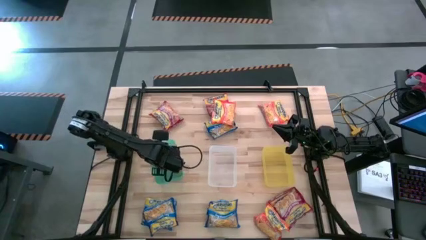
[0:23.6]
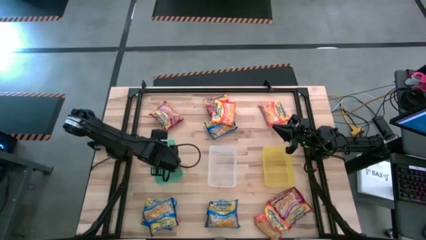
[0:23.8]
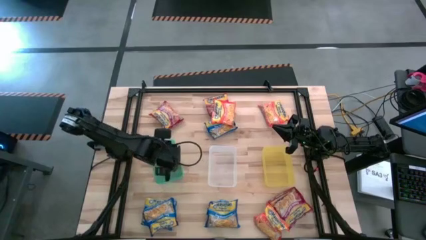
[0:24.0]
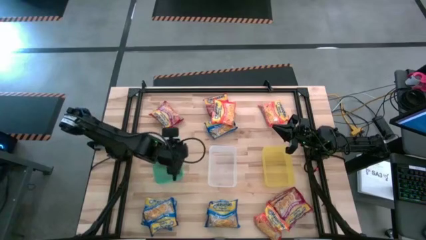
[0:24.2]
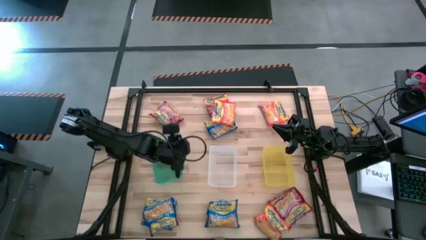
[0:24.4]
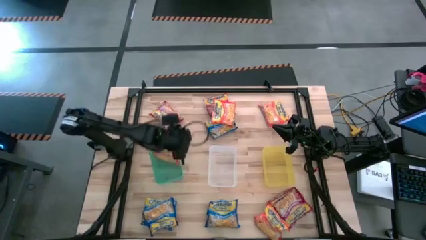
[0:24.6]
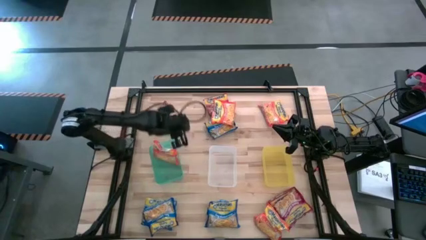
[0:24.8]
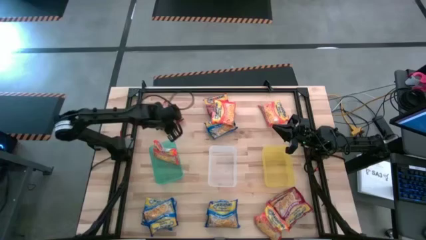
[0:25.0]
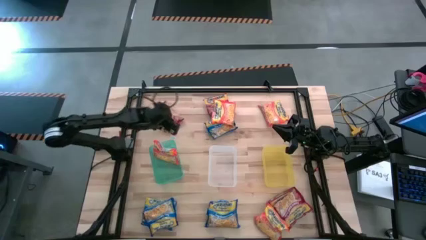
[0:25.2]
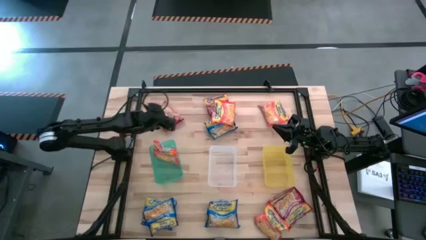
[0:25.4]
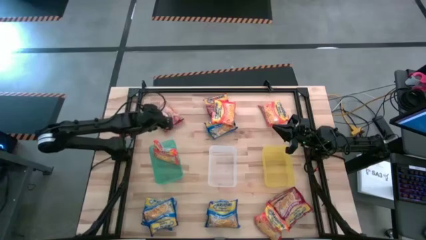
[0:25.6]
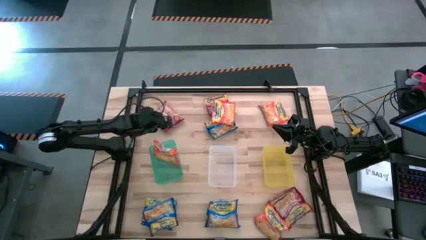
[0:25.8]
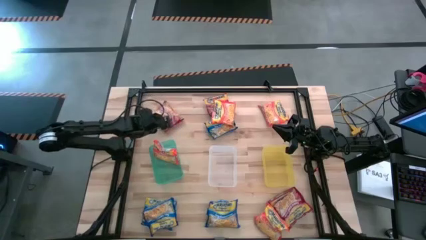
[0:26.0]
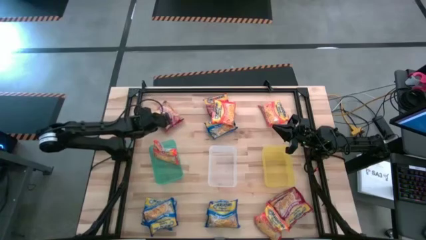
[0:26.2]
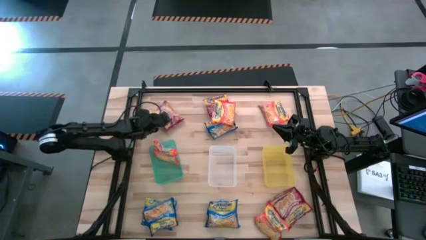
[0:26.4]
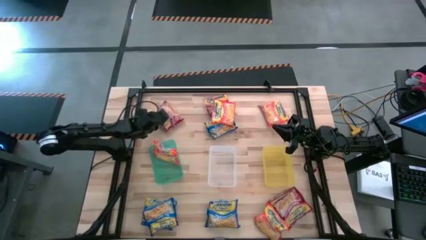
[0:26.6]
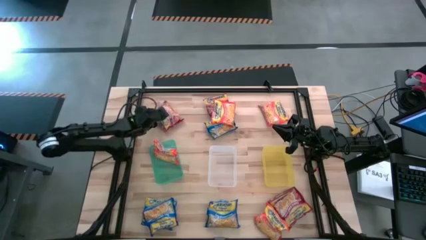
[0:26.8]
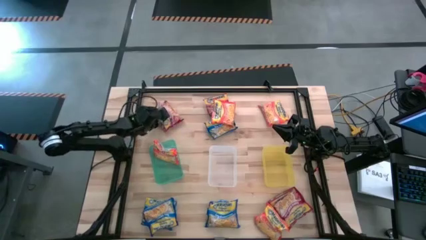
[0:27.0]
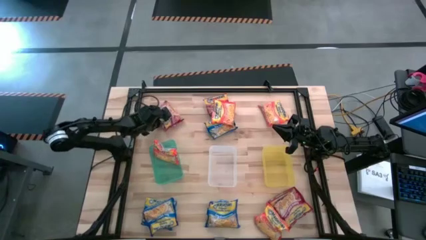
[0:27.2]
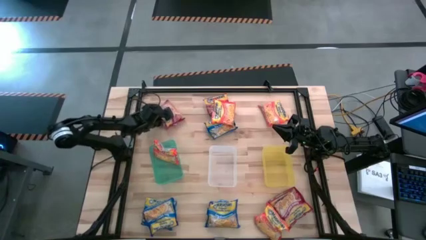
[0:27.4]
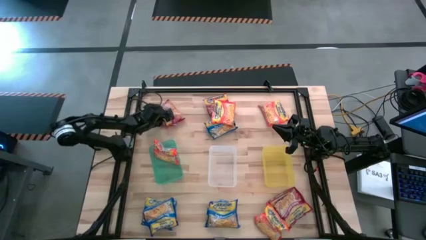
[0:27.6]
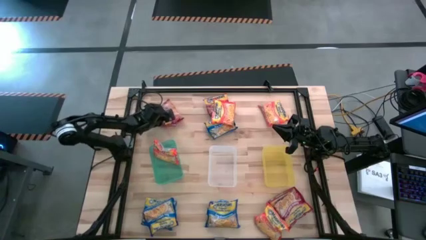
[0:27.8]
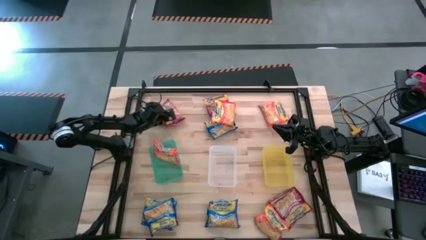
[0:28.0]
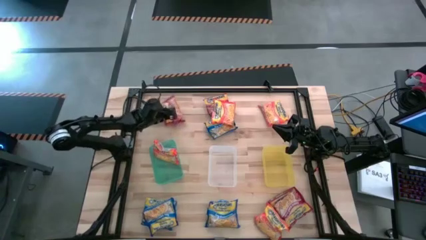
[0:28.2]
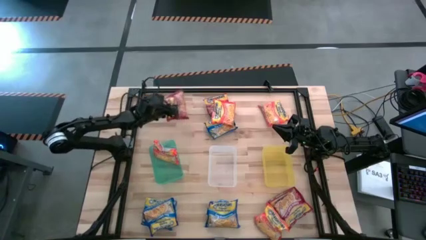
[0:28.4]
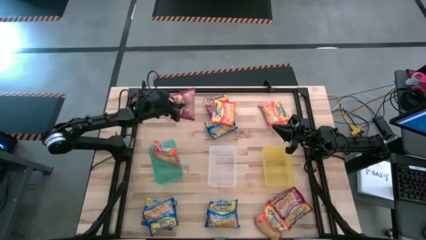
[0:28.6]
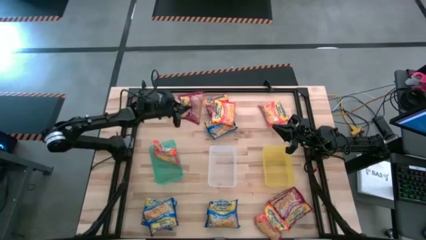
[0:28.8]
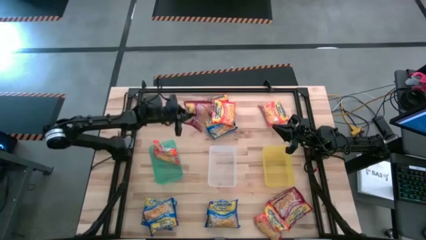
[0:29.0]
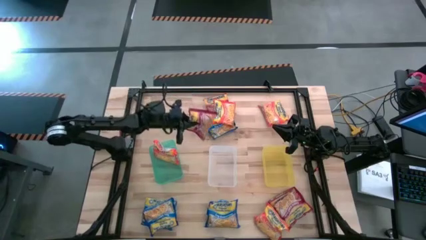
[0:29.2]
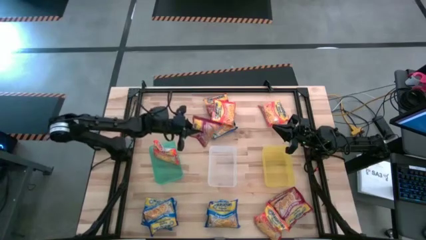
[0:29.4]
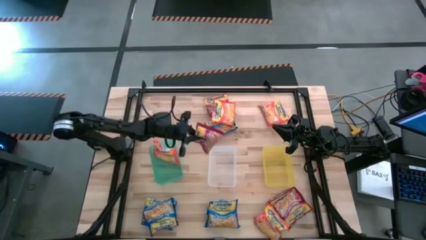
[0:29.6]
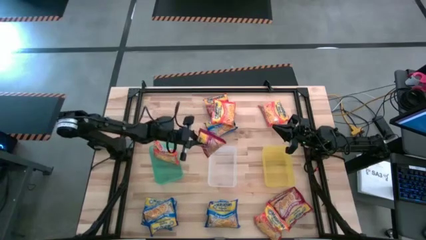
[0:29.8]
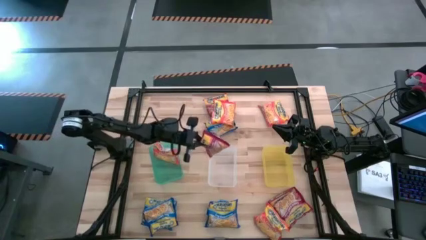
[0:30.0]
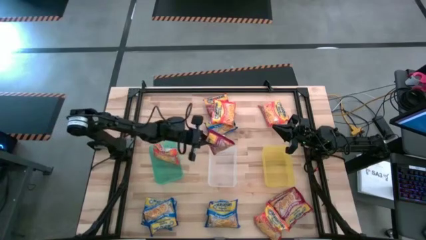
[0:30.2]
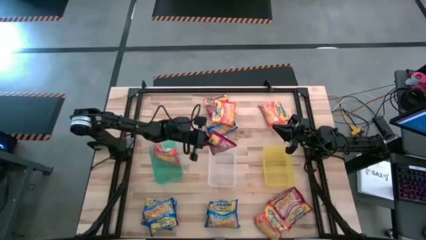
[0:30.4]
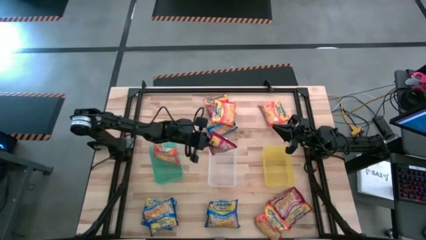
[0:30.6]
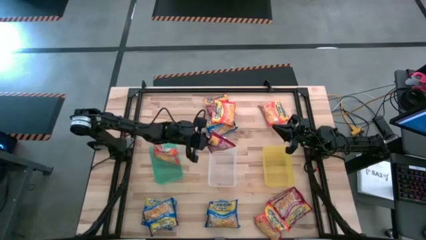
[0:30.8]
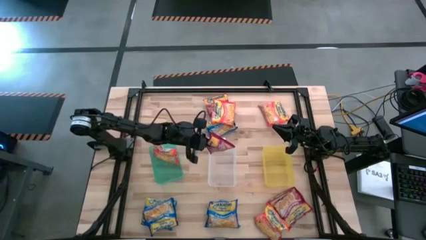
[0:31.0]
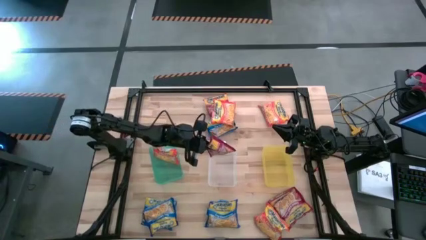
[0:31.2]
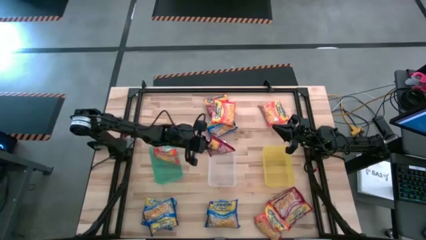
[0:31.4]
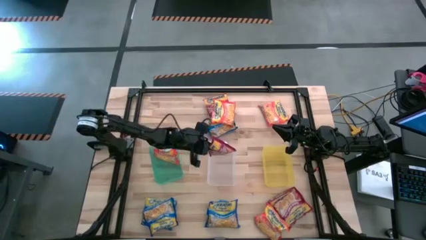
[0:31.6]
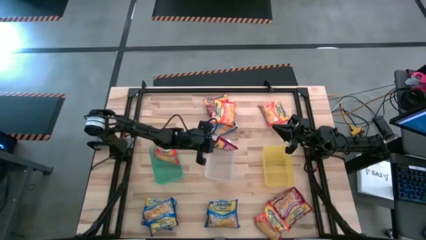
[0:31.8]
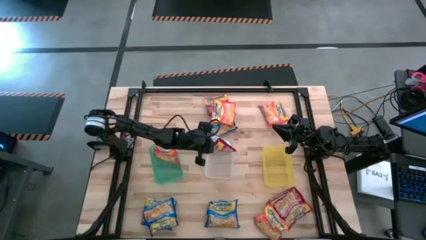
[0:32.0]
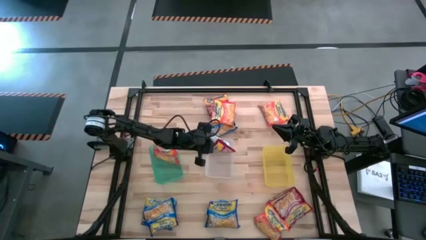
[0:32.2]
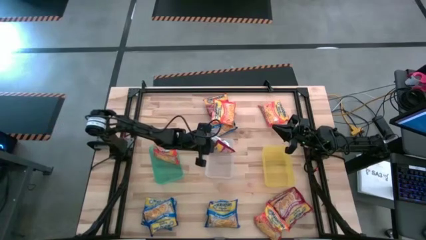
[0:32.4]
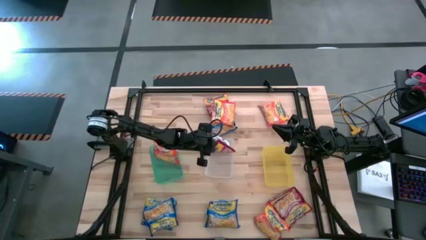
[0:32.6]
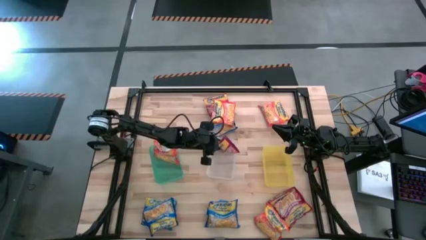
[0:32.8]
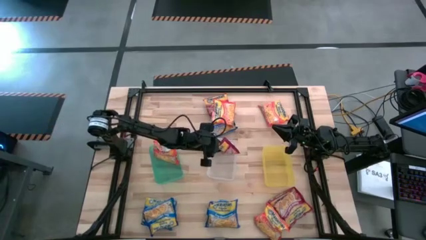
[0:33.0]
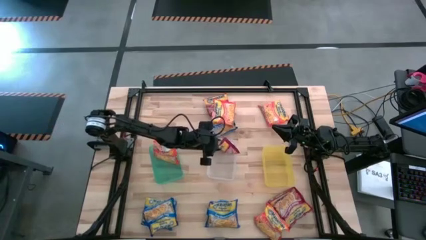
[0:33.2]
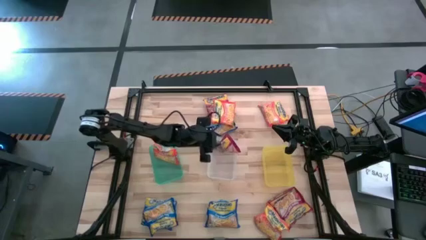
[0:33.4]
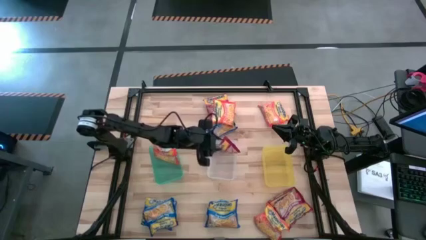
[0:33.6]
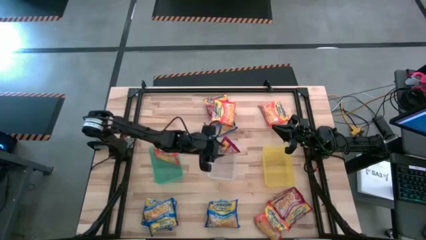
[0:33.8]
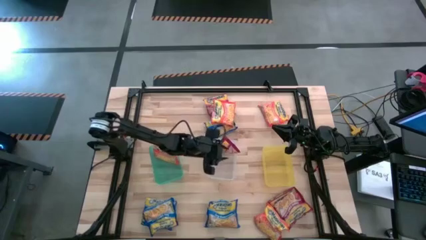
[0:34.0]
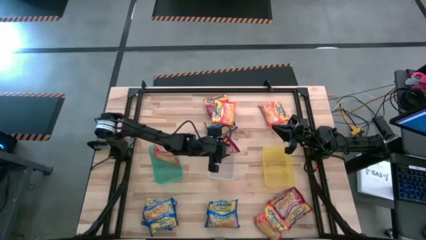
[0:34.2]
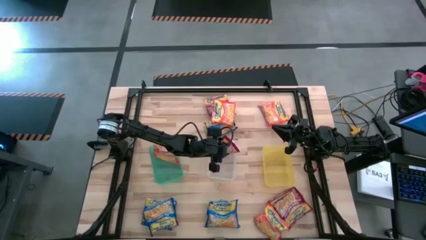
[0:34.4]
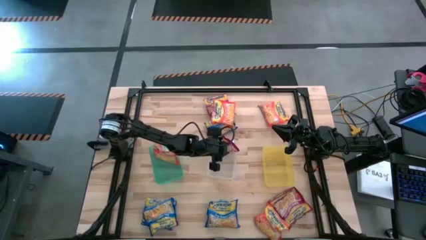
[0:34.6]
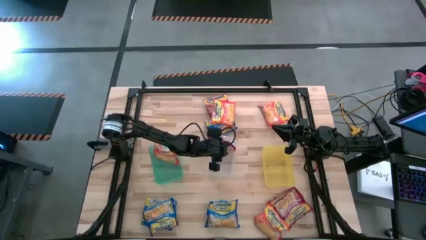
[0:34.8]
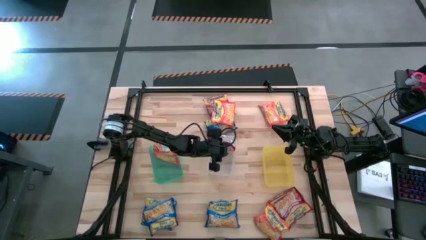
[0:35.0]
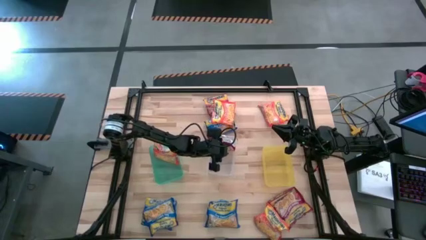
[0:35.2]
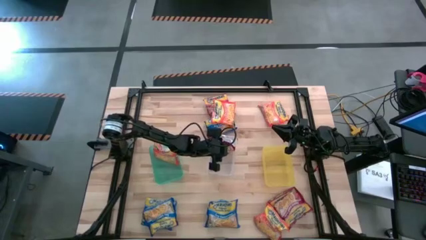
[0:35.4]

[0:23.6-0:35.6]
Task: Sort Maruchan noodles
Put the red noodle pack into the white bin

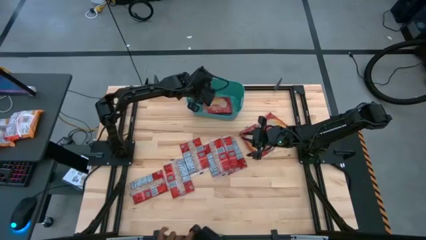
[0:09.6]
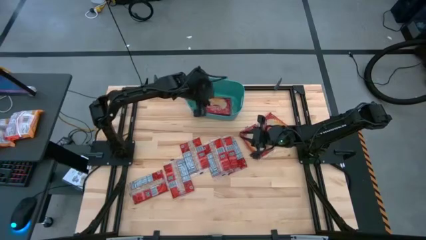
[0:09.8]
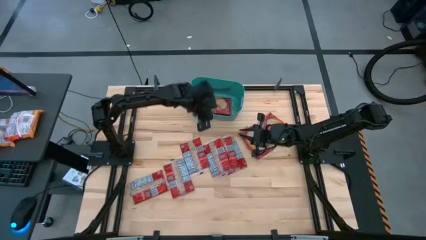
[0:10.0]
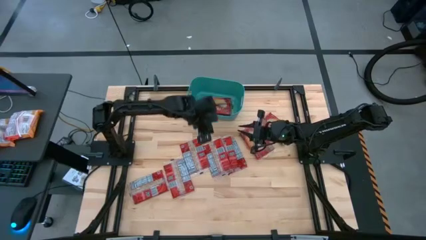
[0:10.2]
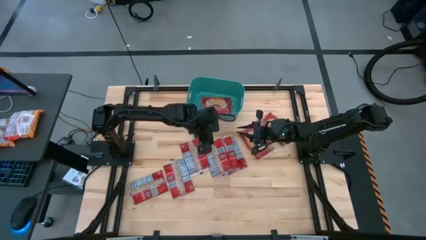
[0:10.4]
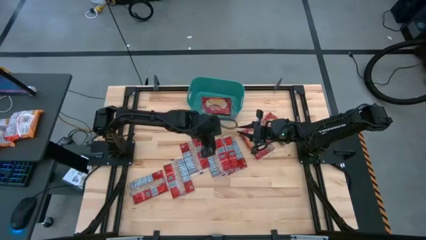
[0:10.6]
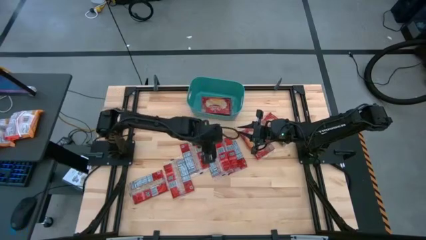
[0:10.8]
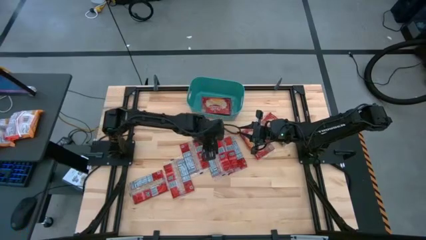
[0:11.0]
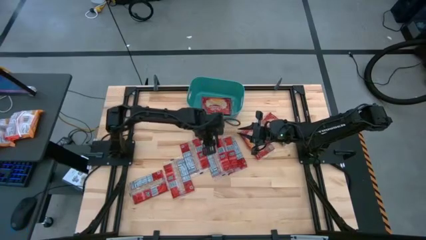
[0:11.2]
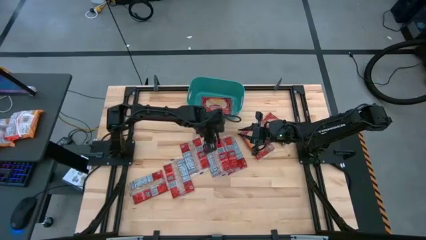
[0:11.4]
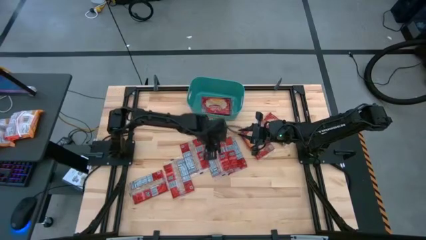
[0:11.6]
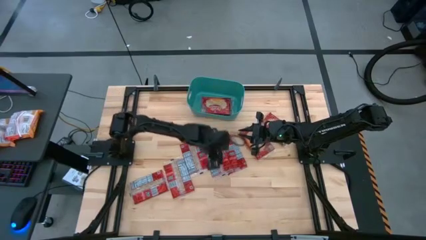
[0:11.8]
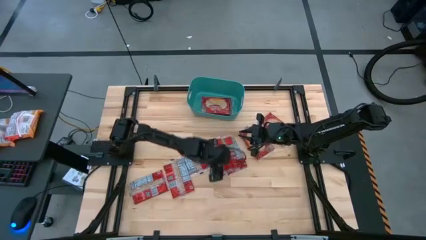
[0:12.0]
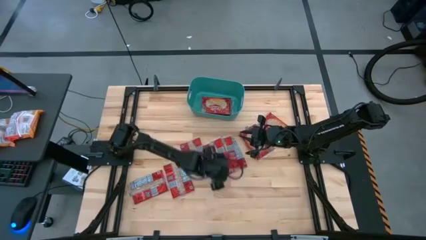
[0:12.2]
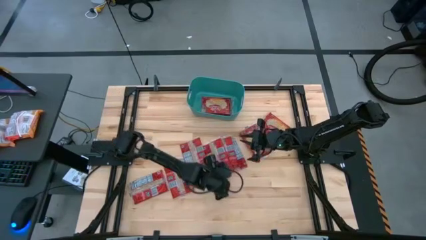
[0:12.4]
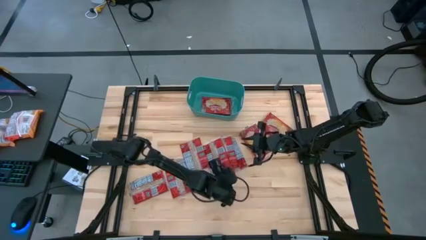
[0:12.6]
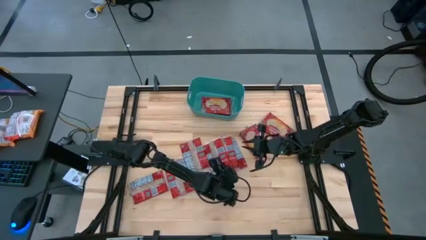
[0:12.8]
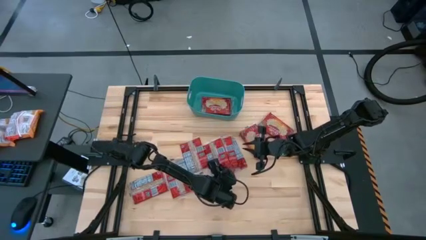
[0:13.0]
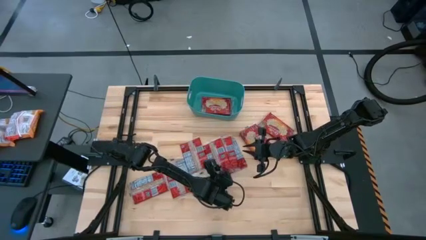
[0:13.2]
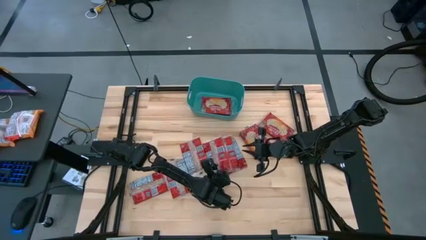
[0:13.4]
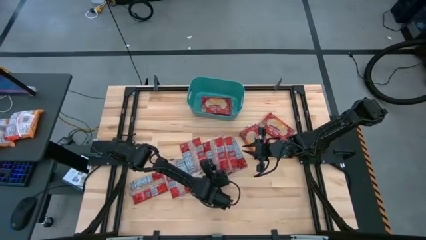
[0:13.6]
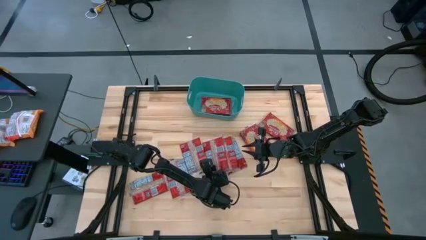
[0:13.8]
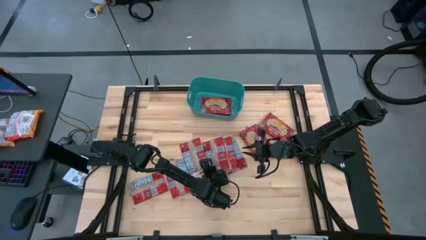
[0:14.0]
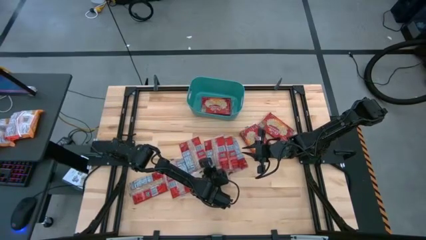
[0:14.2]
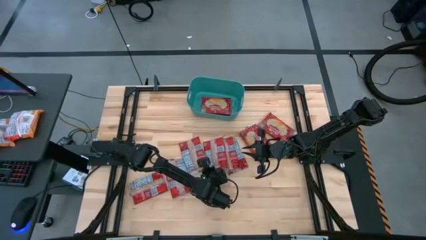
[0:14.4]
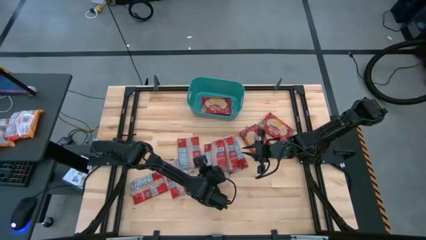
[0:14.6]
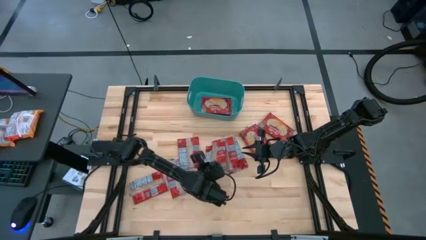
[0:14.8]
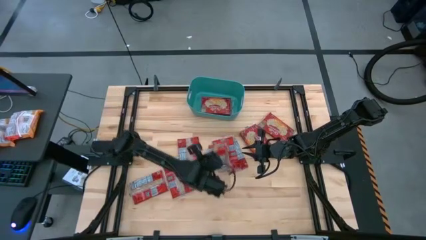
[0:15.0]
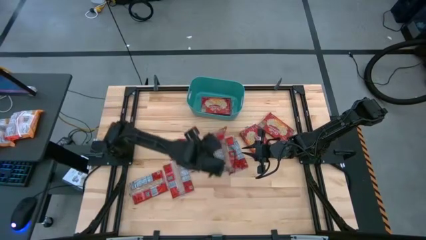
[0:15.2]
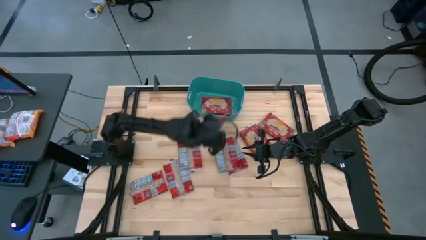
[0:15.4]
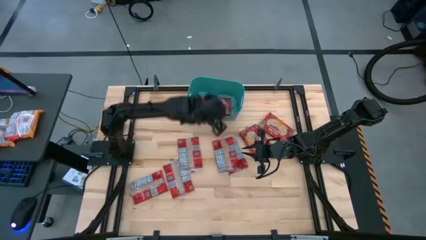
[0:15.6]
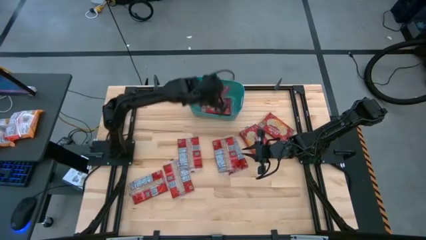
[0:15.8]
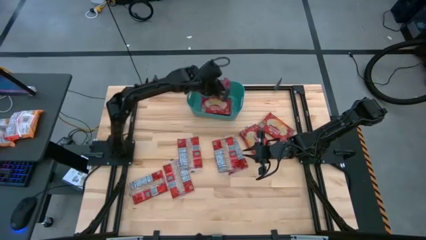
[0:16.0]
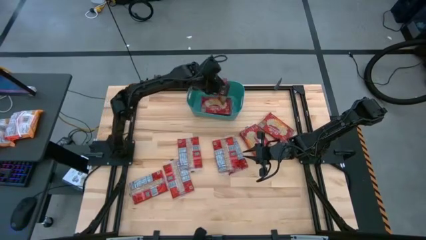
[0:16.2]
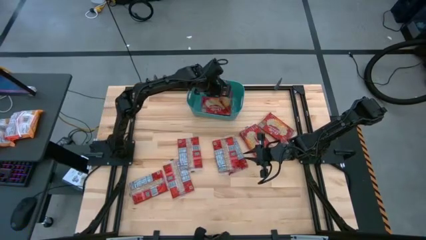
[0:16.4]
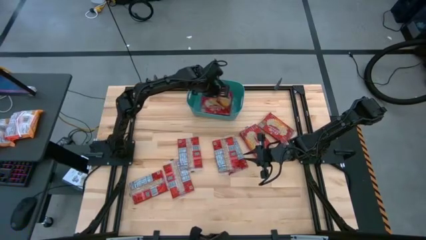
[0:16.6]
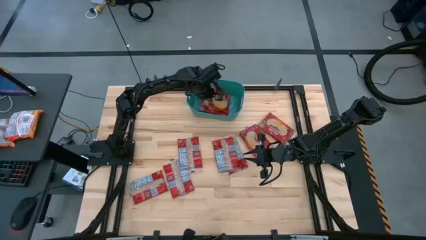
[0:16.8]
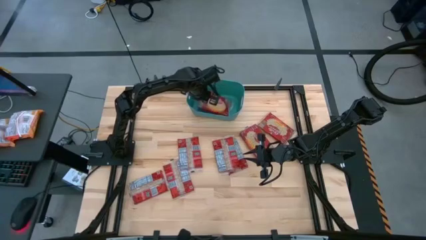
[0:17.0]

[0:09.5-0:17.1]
Task: Sort popcorn bags into baskets
Put the red popcorn bag into the green bin
